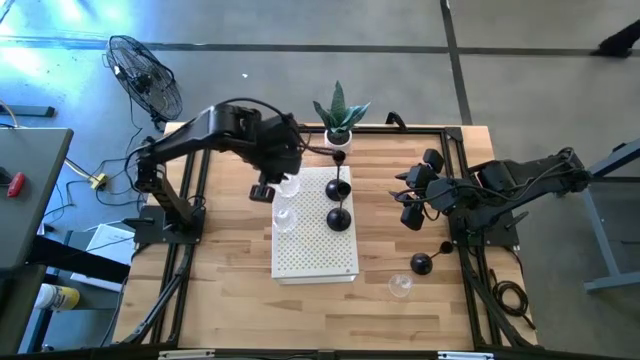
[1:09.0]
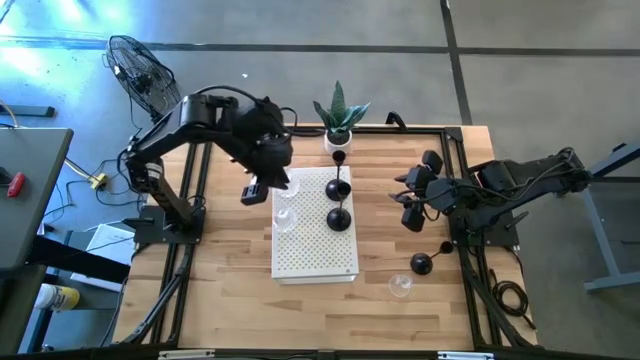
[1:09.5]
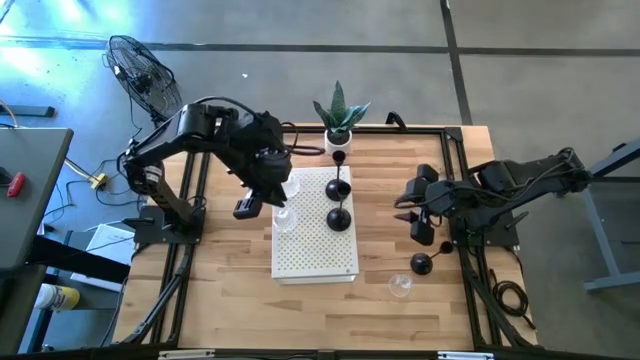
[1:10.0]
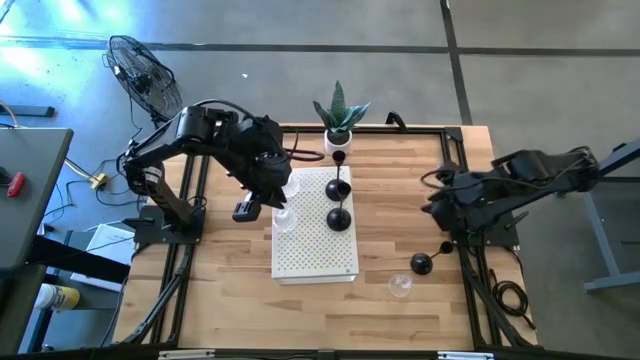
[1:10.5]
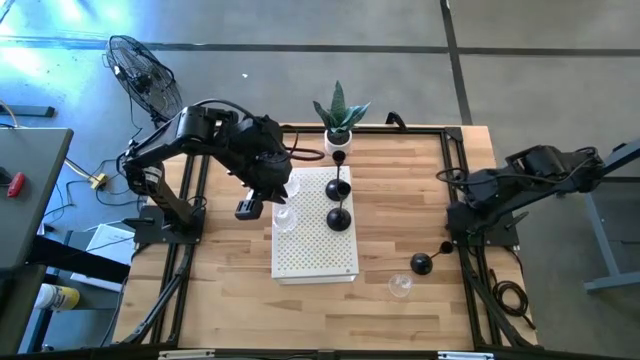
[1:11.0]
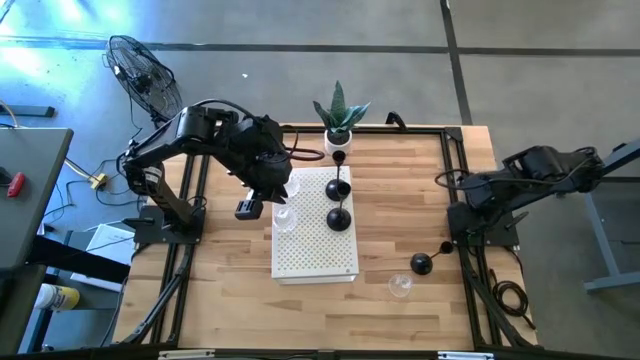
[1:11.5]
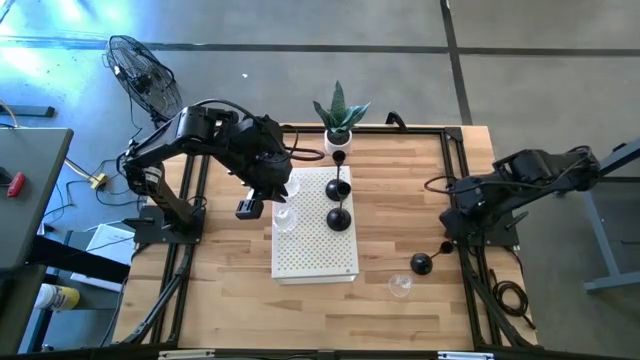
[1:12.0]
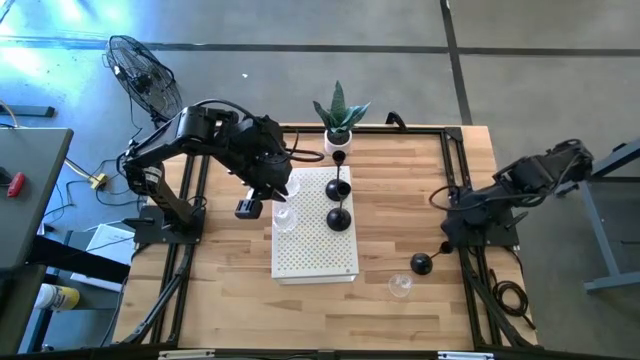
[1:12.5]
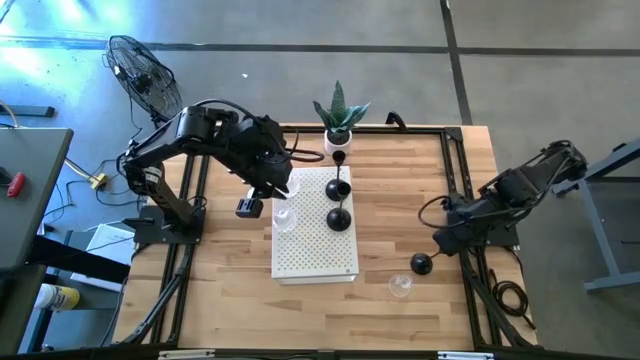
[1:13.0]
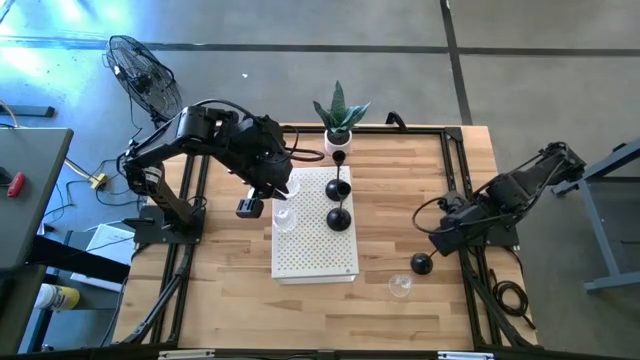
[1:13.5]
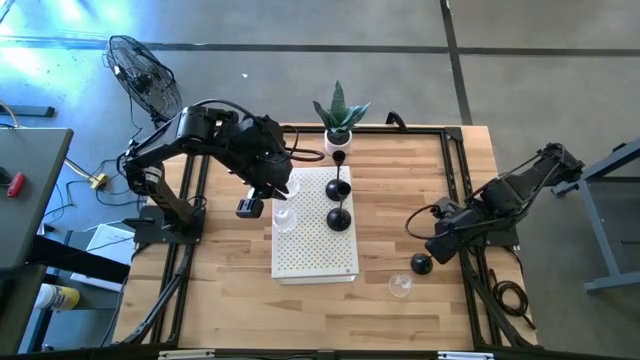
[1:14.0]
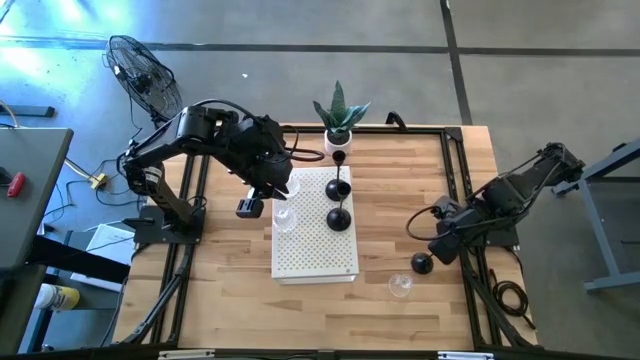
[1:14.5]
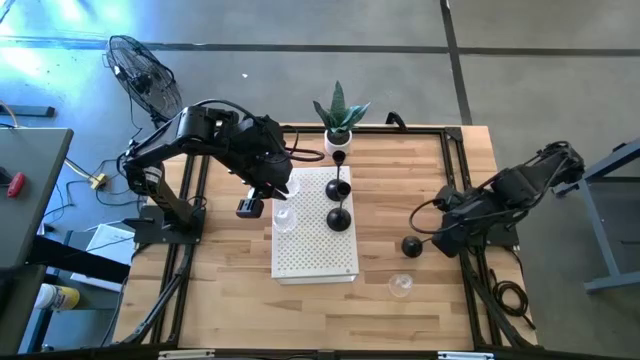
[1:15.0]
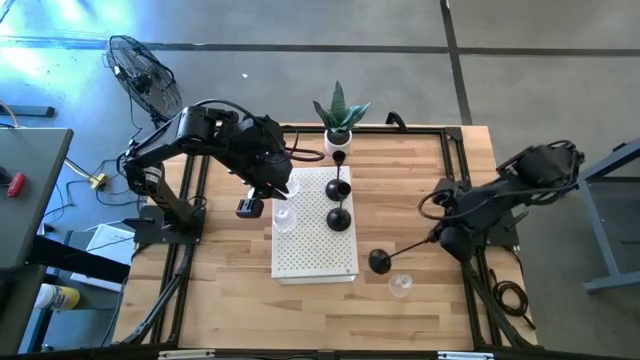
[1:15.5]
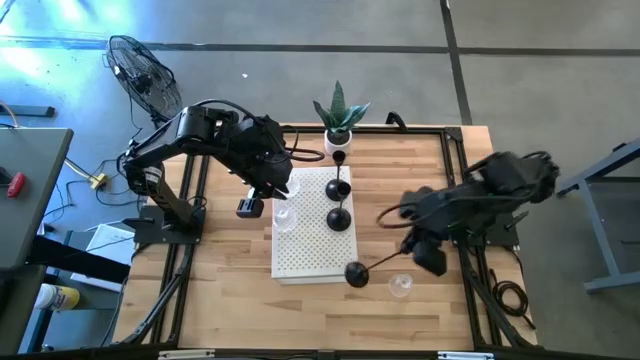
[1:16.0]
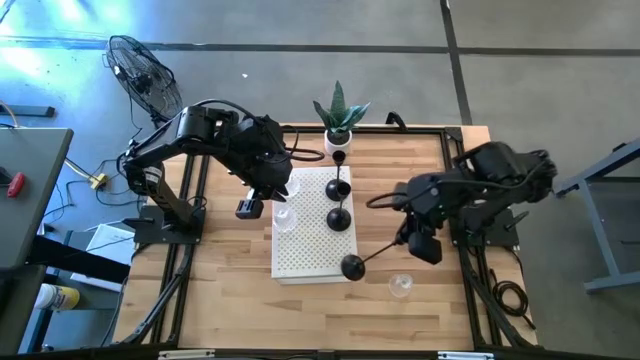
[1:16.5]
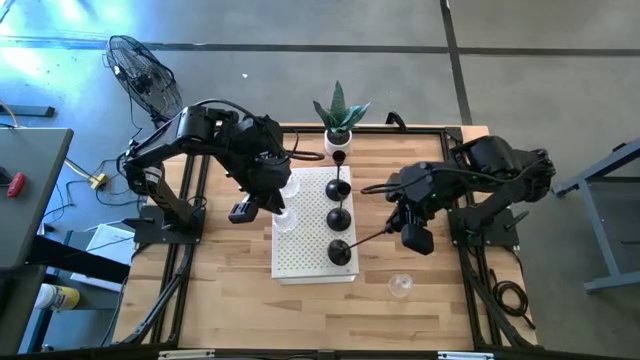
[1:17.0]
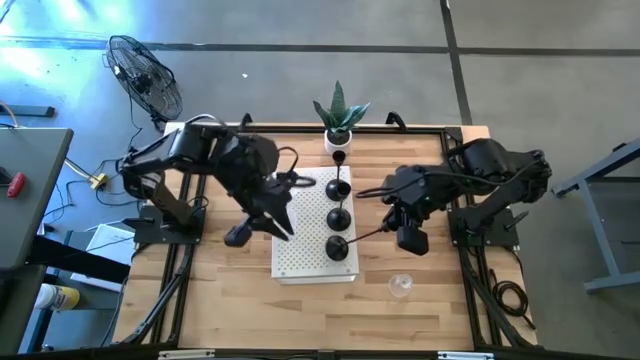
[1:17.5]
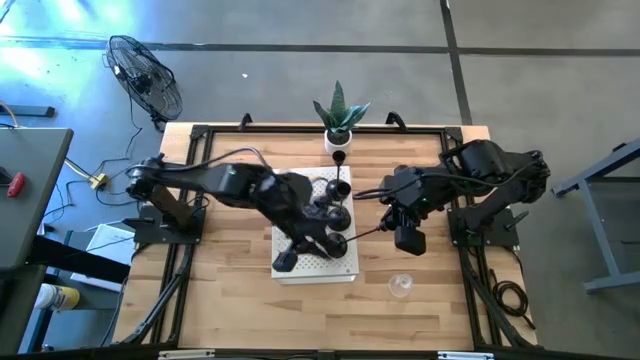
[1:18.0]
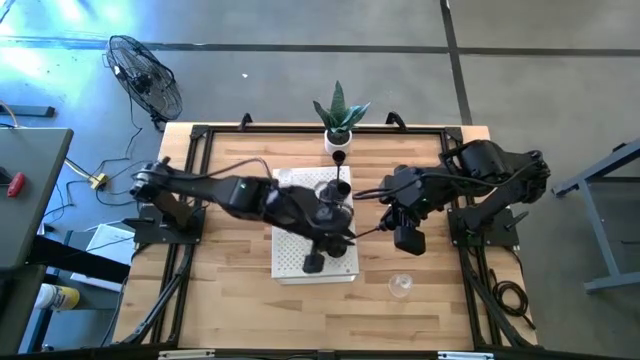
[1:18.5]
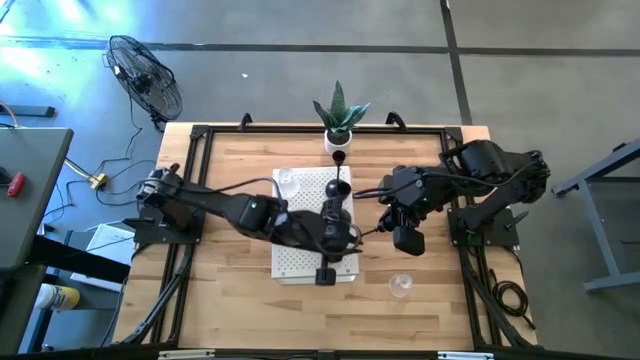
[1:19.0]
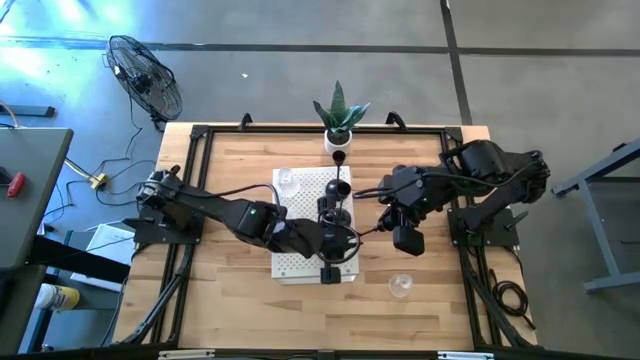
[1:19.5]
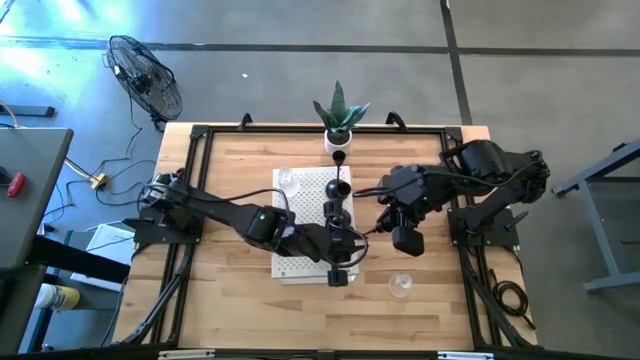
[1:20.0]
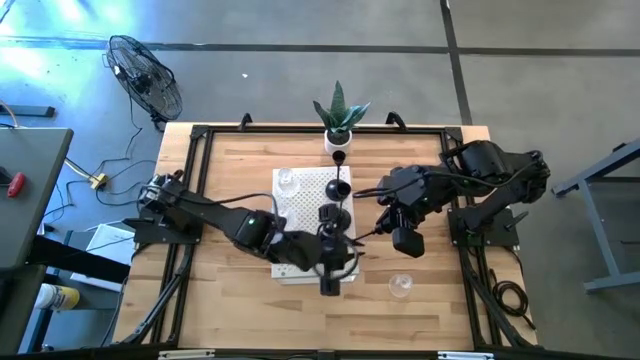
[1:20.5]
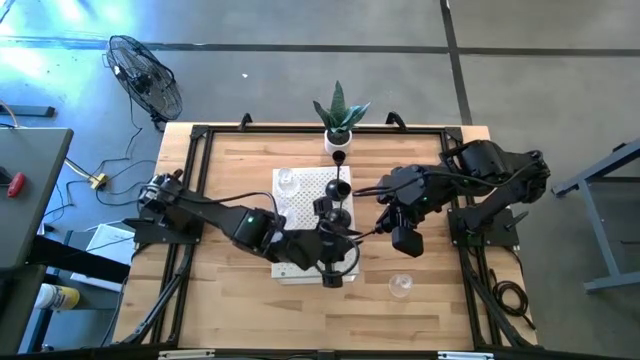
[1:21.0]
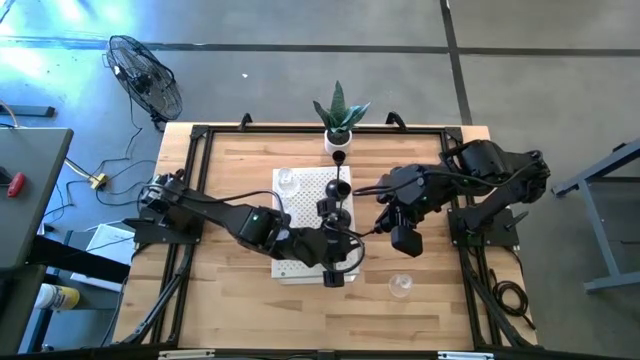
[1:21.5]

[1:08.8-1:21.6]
Task: Pick & Place candle stick holders
Put the black candle holder on the shelf aligned with the other black candle holders

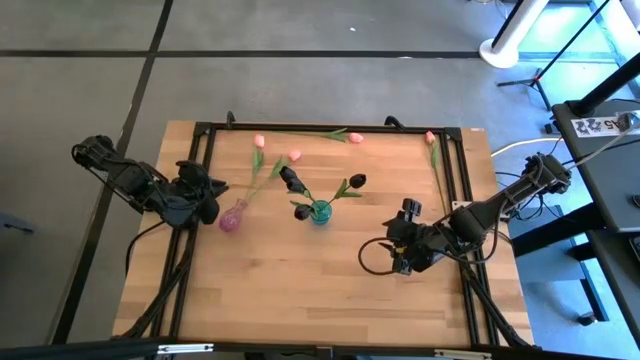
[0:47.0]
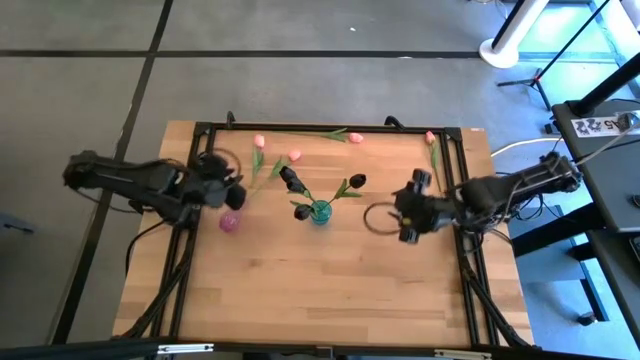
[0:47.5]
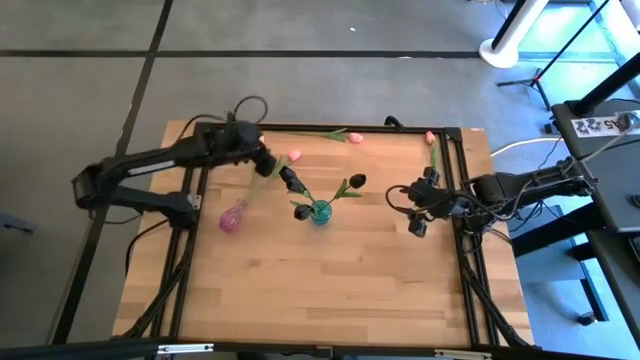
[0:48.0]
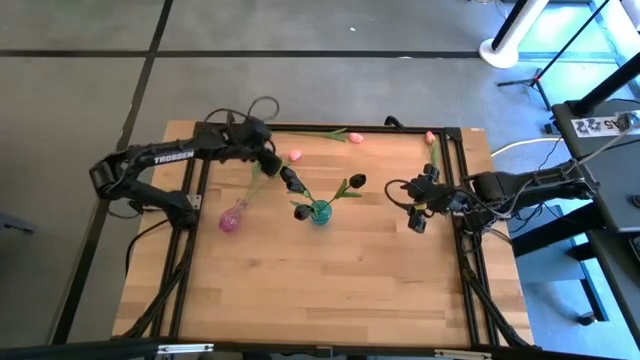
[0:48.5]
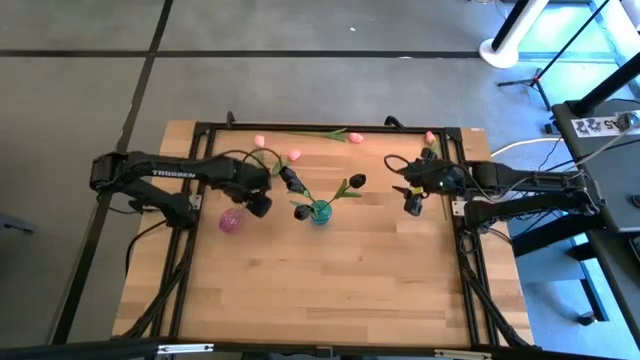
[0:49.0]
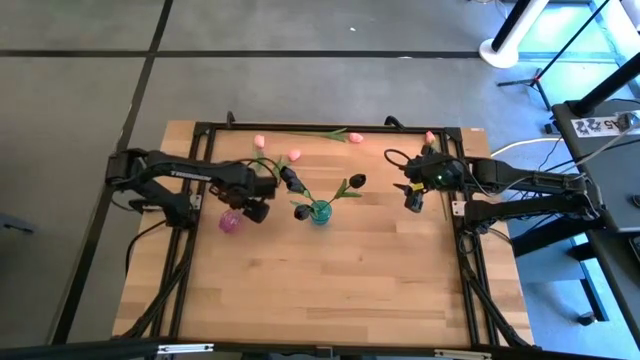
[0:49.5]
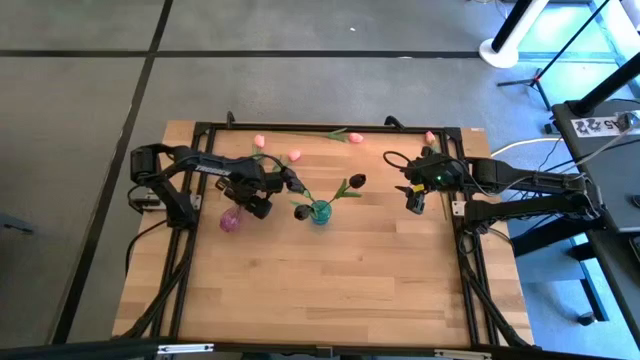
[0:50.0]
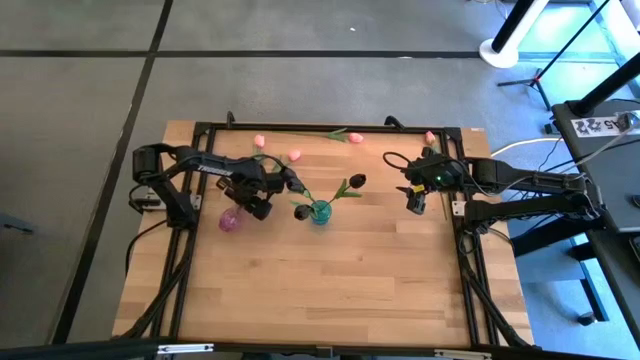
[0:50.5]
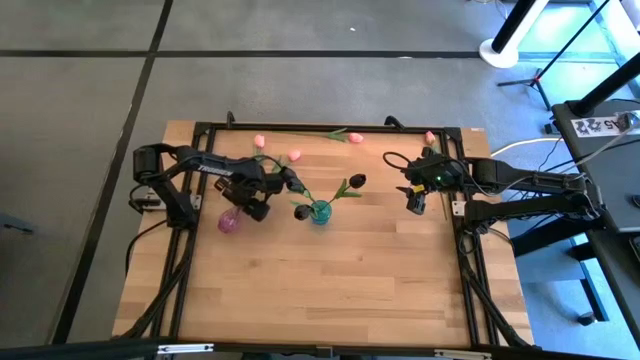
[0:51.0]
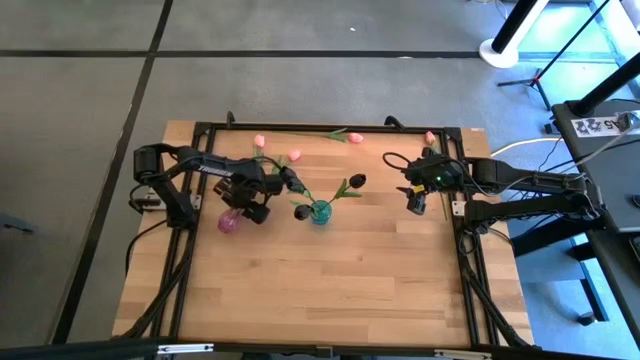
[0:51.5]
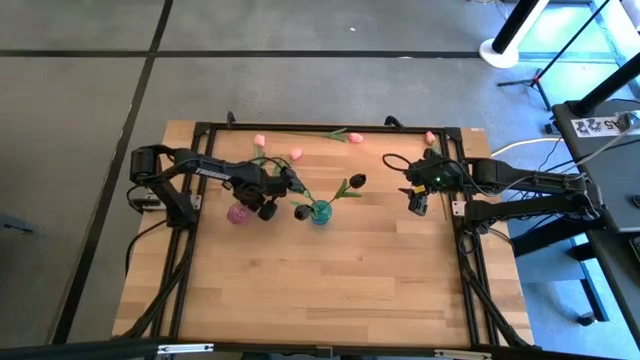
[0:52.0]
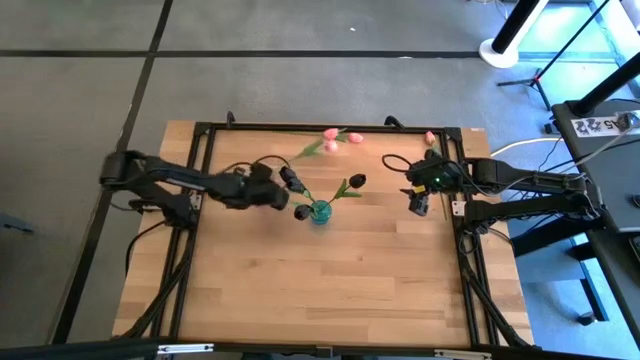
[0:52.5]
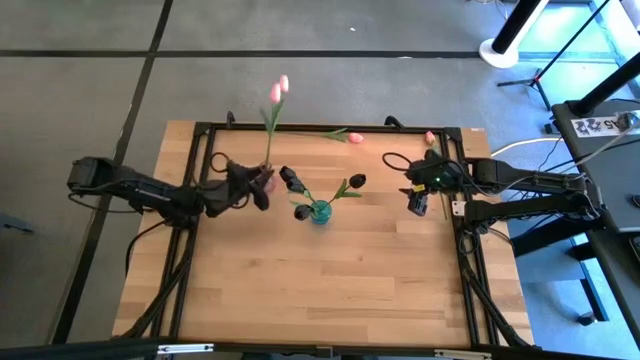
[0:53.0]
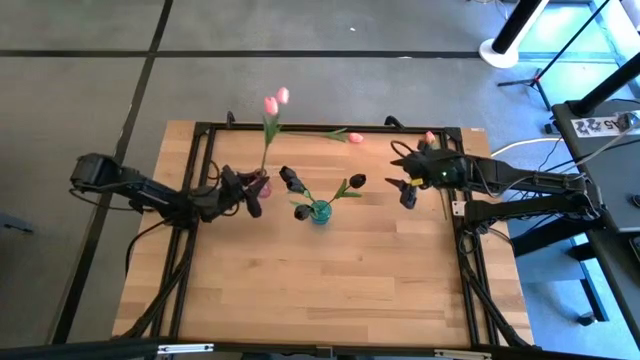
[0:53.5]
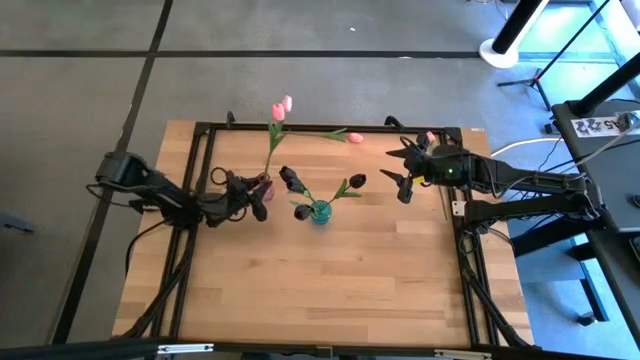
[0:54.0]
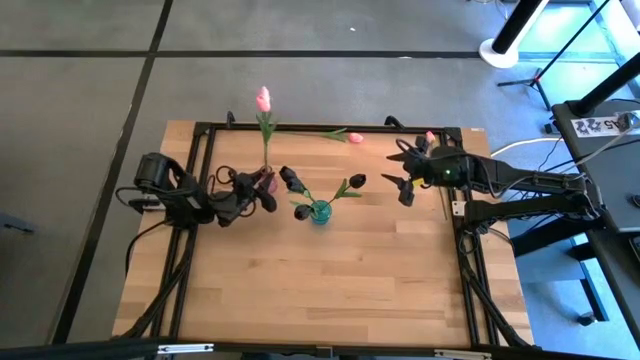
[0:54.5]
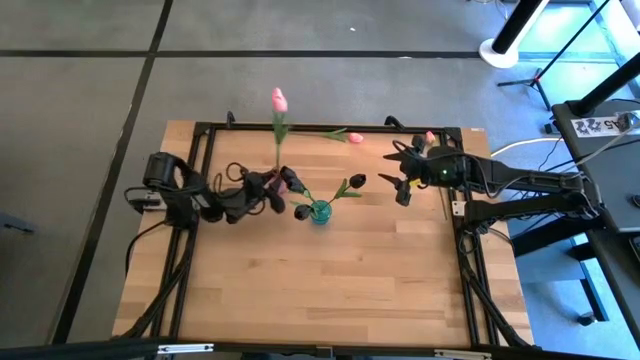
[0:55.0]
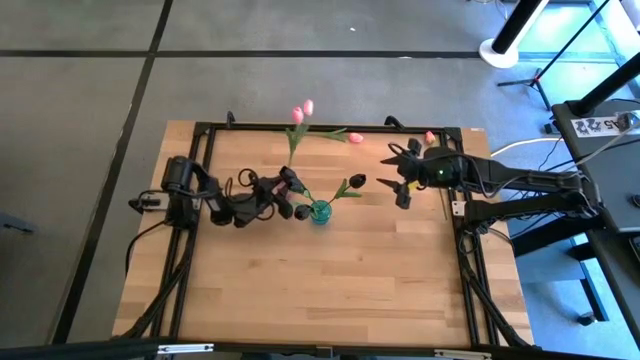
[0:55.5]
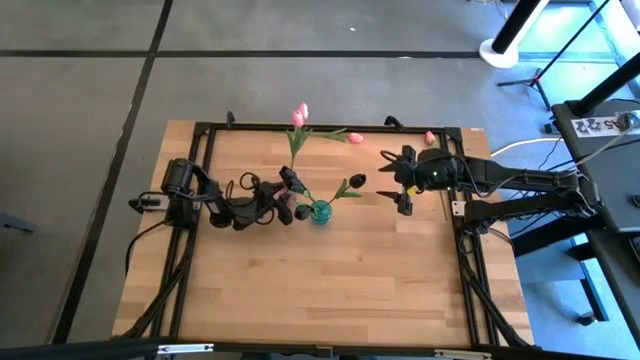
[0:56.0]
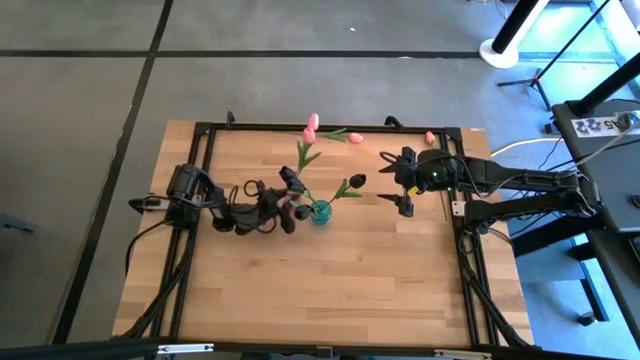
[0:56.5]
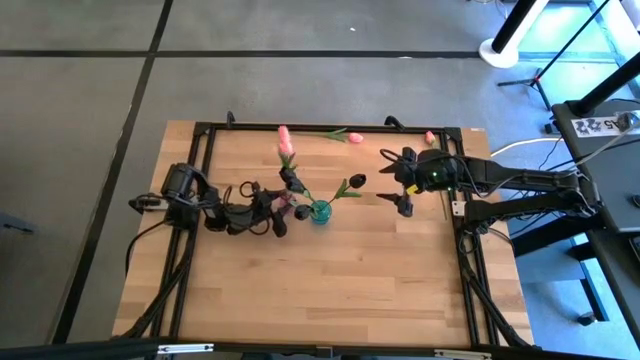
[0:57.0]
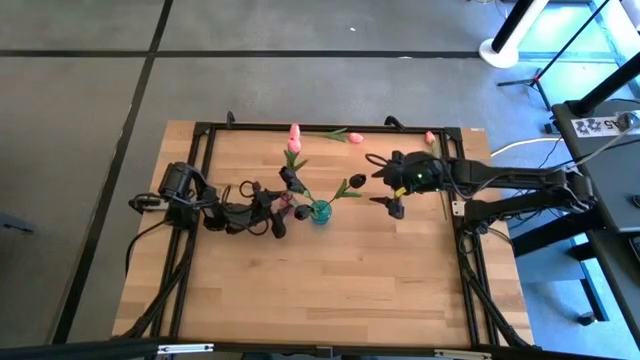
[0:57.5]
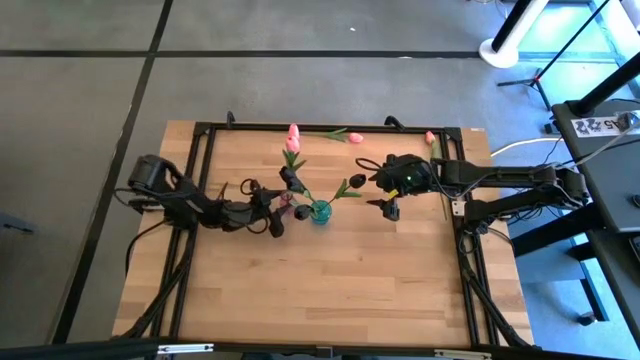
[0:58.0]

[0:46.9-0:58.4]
Task: Sort flowers into vase by color
Adjust the pink vase
